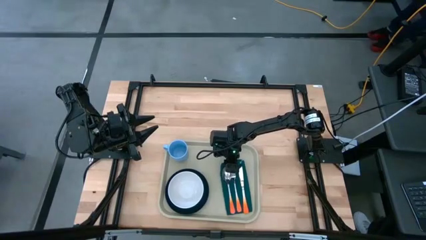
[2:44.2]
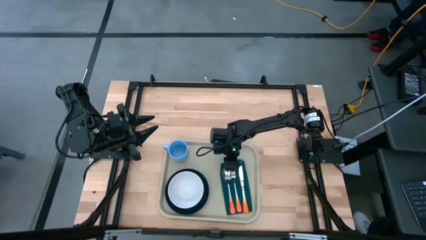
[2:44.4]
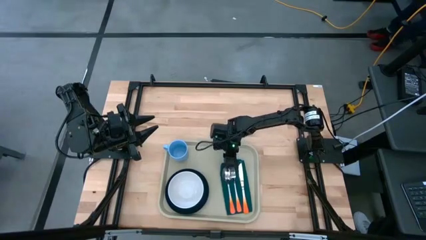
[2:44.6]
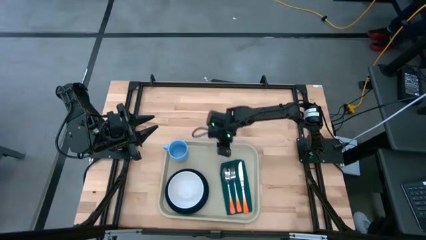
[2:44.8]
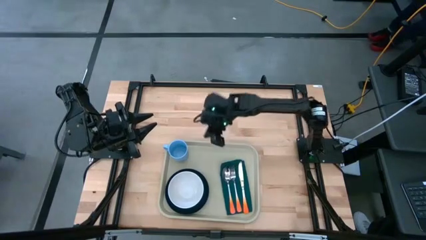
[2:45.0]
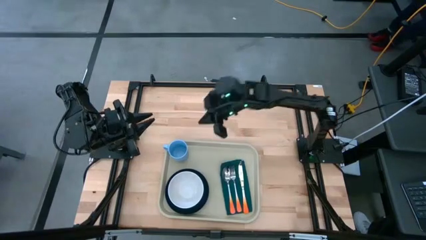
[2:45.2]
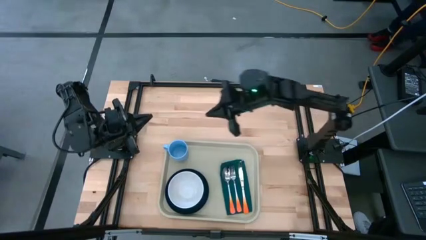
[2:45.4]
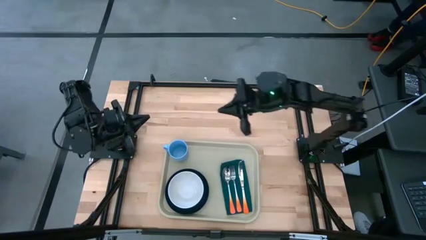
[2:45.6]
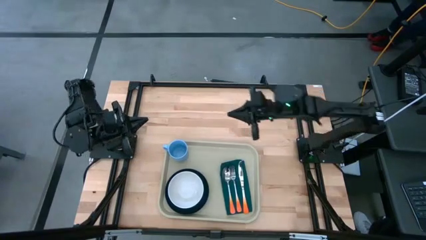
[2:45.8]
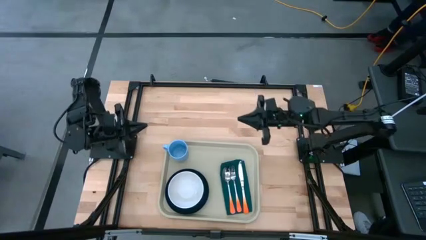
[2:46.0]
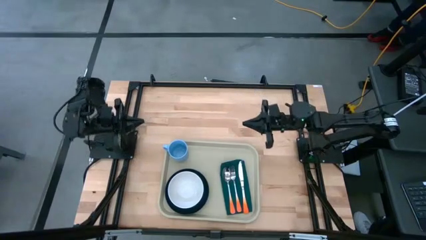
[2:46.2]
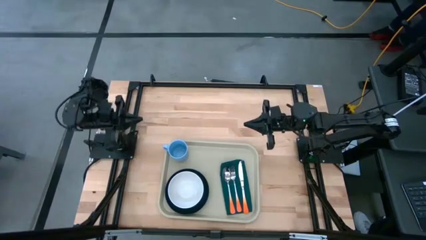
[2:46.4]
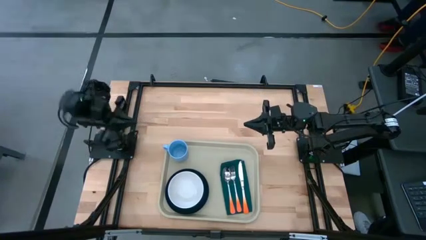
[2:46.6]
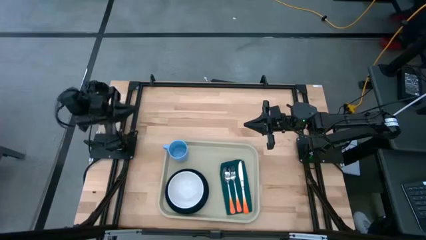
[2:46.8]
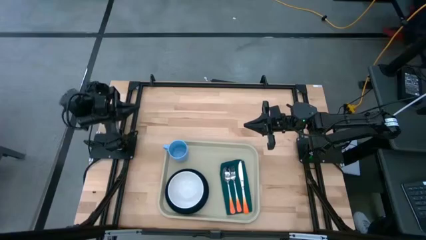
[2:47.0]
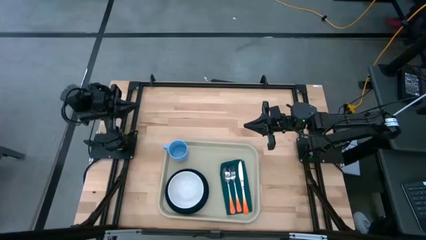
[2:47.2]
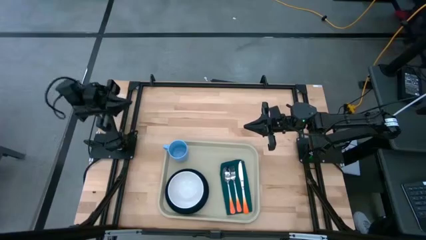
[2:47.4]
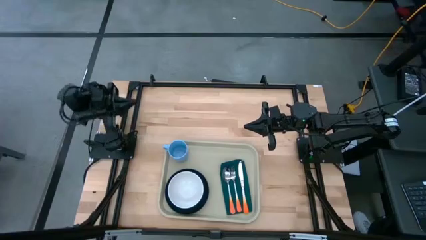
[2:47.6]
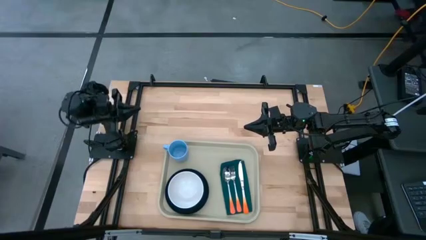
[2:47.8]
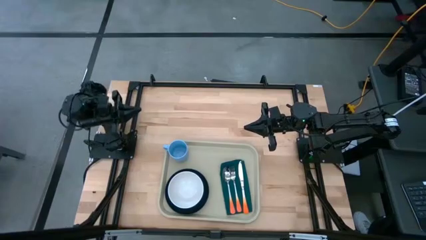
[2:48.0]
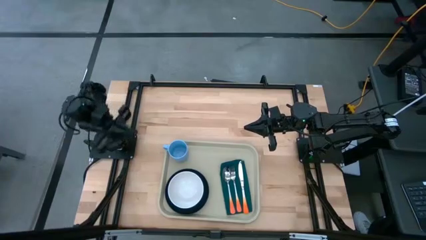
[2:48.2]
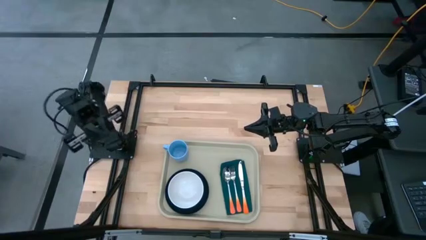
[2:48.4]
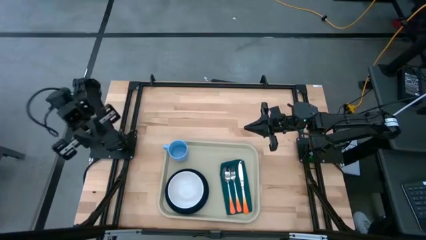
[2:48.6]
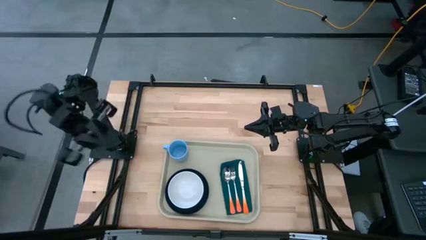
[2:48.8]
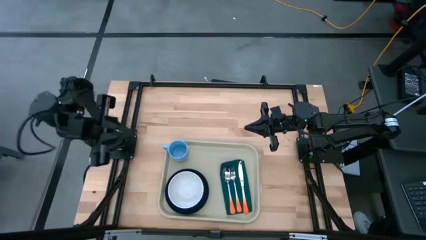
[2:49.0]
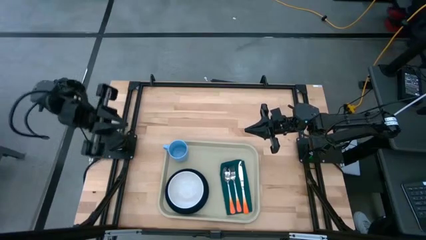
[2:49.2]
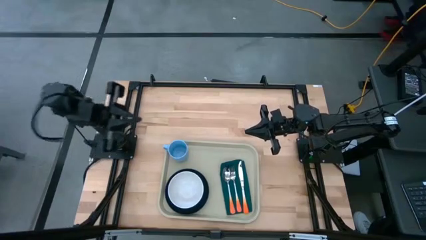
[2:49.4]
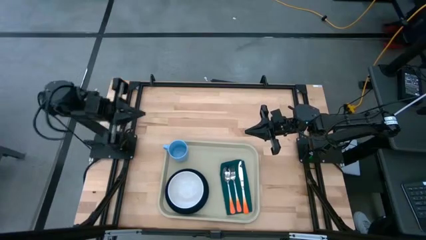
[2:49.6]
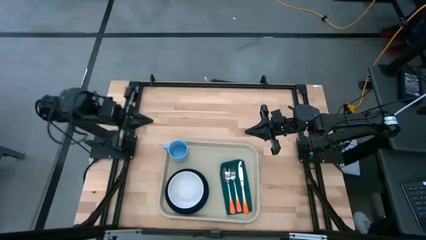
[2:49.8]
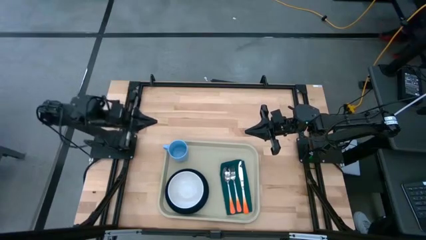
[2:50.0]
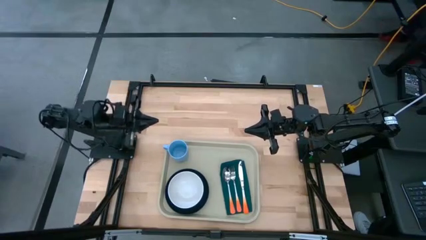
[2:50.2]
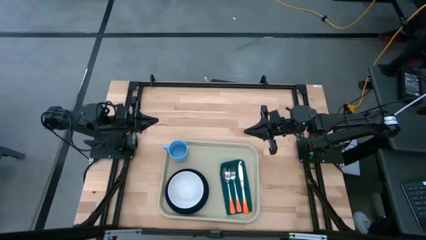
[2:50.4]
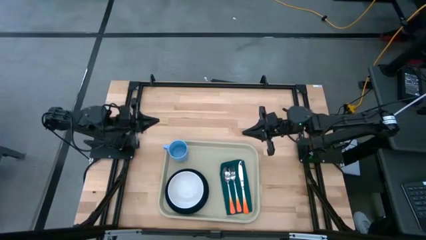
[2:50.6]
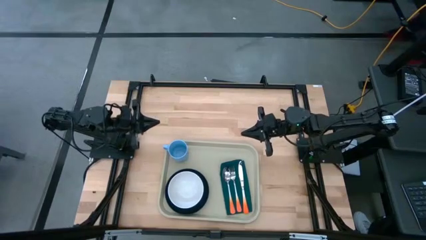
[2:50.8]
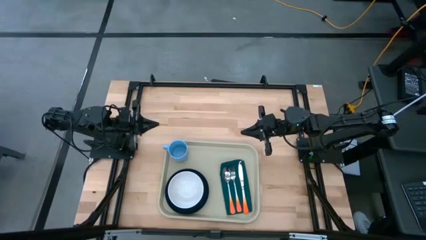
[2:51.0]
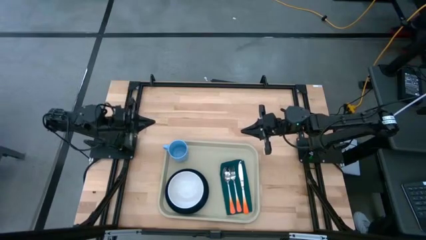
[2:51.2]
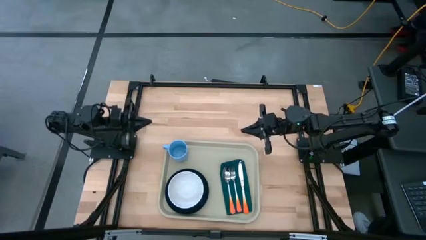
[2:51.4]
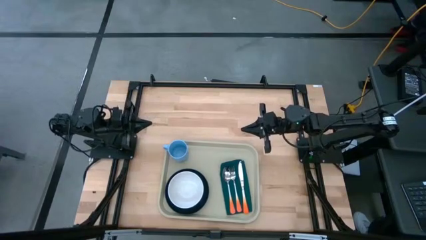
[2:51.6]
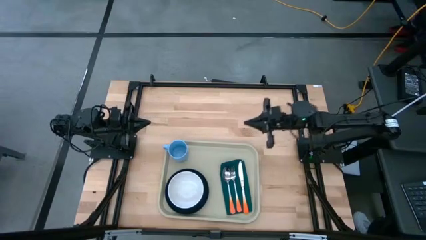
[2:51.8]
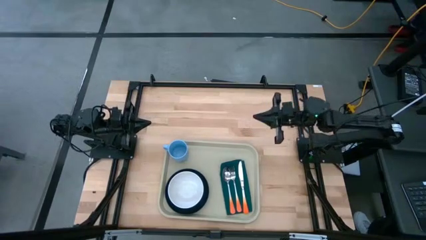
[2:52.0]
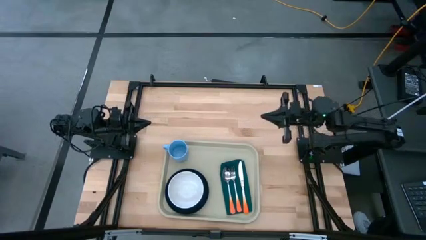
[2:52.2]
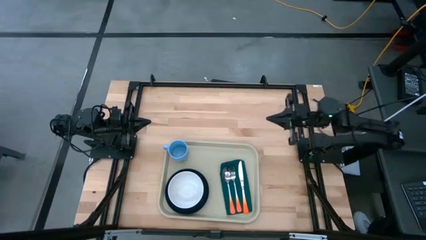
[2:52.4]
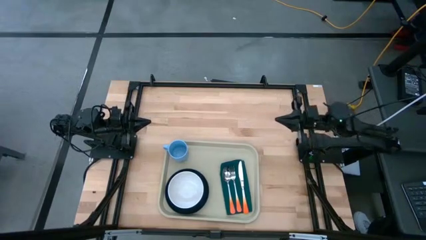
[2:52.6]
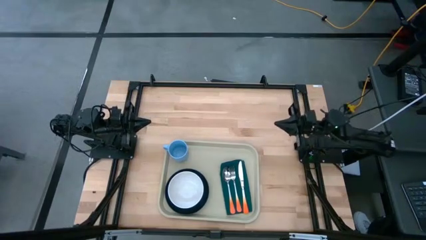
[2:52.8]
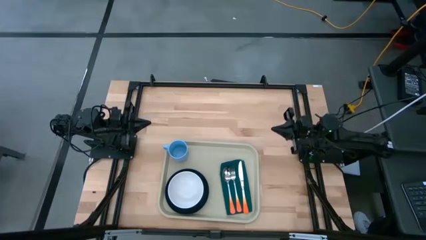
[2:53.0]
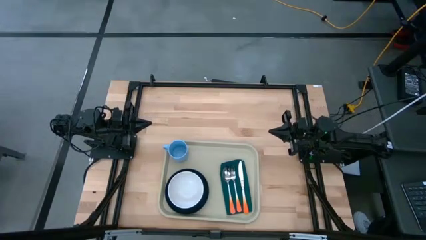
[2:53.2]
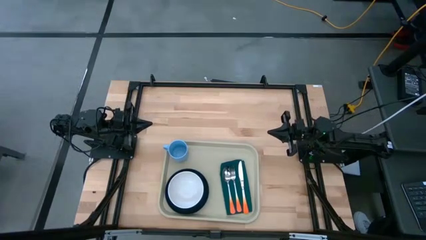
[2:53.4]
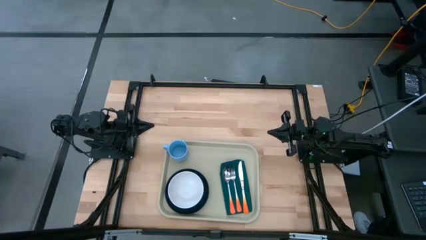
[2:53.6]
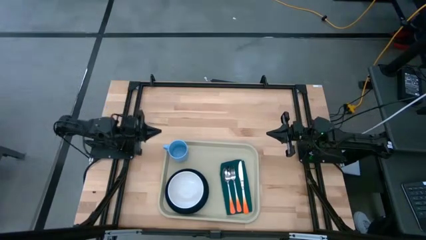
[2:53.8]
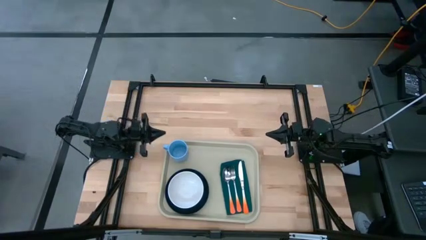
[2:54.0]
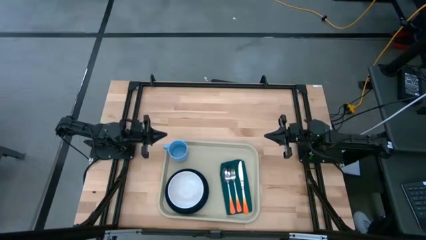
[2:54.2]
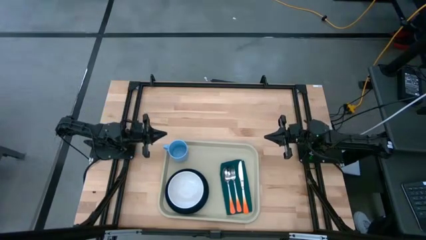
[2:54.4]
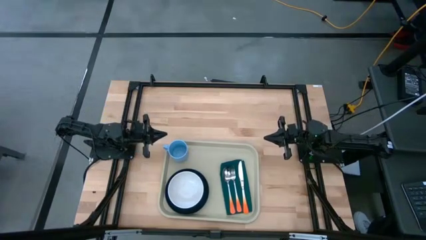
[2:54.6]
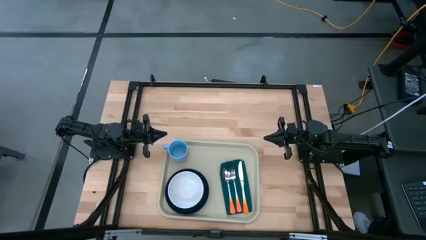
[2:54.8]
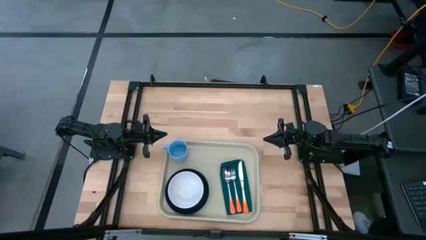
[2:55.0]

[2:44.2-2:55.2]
Task: Set up tray
Return to Home Position

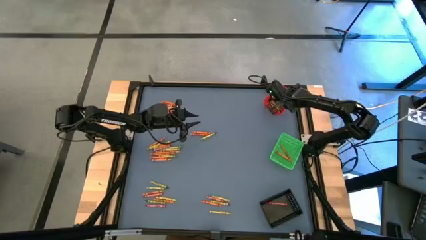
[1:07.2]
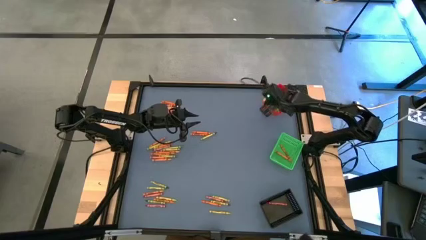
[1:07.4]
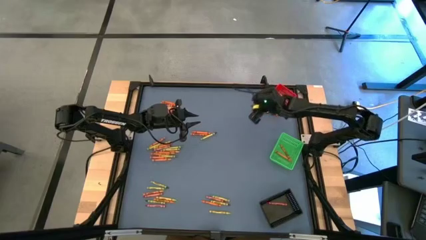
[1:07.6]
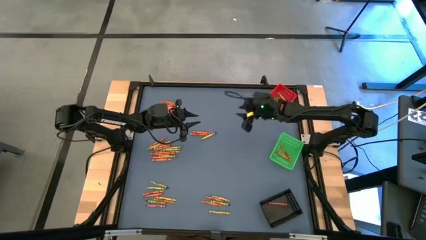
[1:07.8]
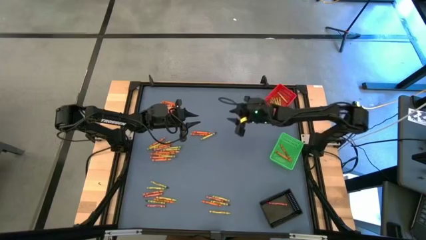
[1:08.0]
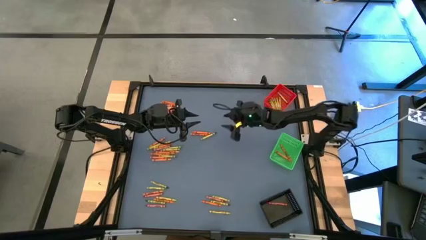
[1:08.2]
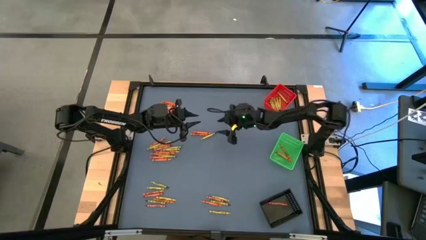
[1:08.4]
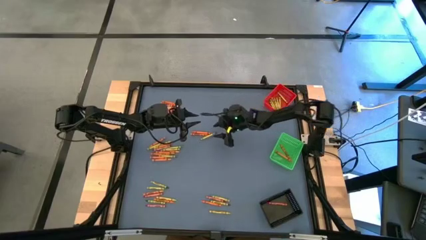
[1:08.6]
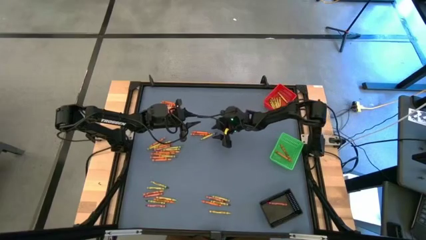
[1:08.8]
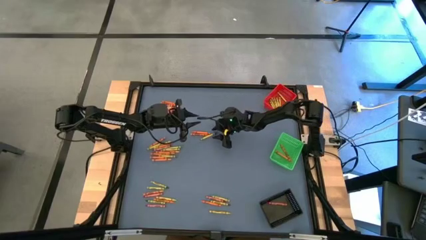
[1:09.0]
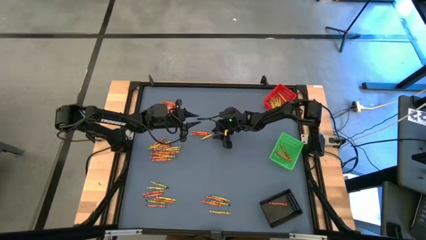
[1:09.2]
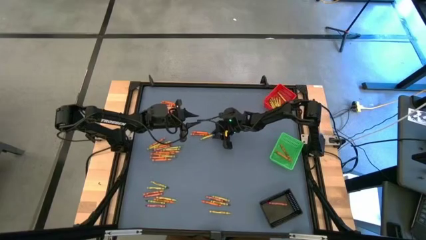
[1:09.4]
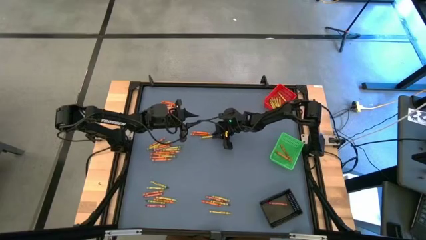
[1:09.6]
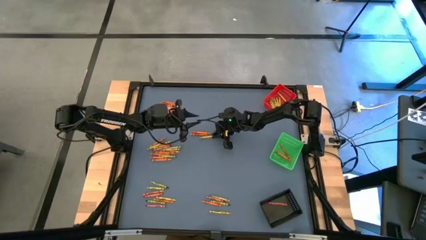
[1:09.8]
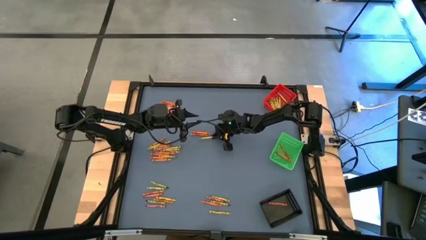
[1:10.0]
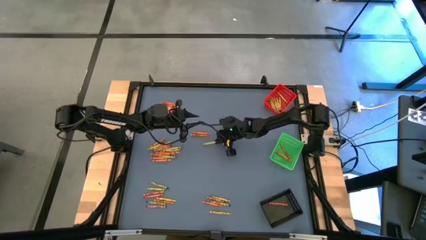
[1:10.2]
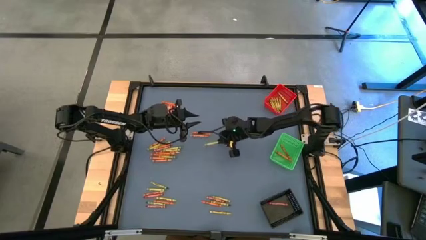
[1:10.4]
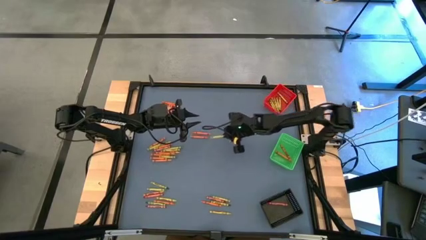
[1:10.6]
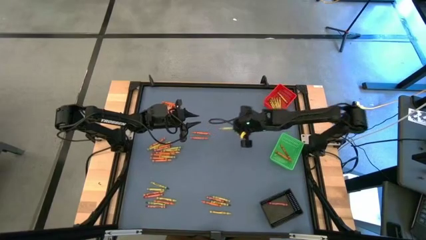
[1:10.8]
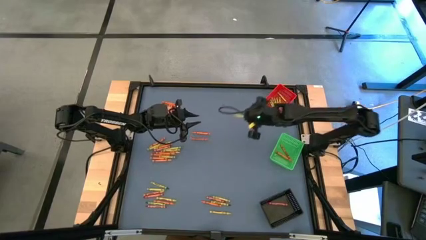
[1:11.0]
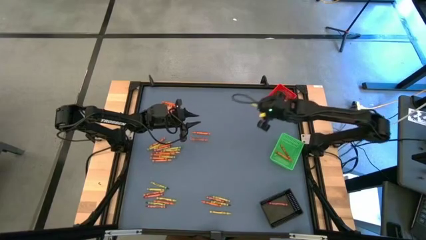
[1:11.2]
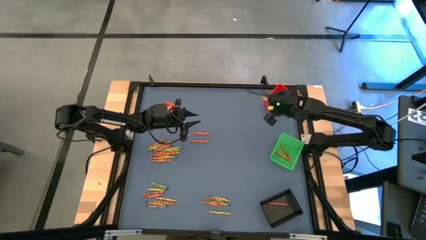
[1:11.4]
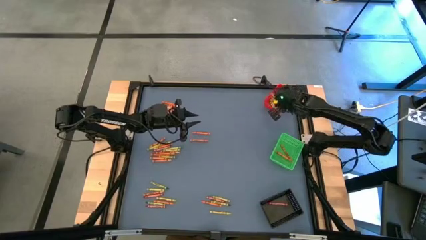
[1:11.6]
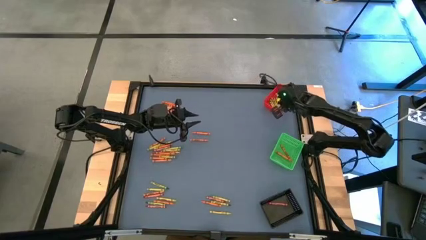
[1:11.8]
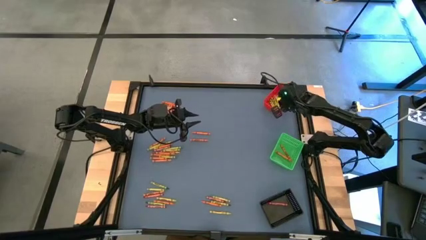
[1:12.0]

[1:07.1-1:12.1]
Task: Sort crayons
Put the green crayon into the red bin
